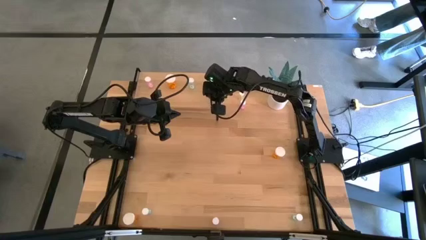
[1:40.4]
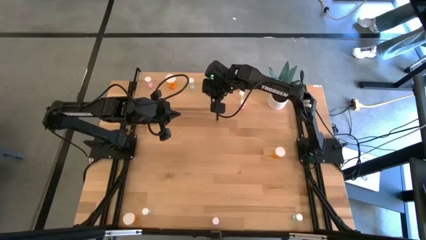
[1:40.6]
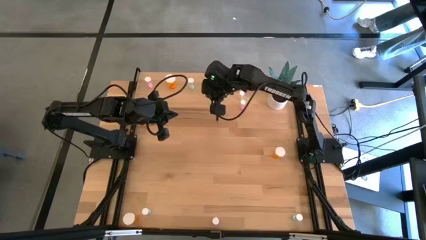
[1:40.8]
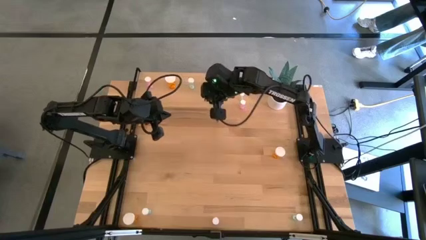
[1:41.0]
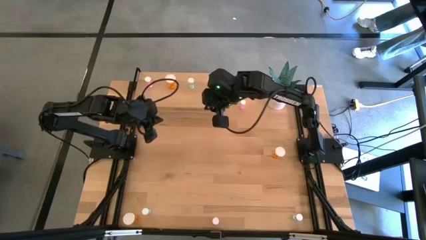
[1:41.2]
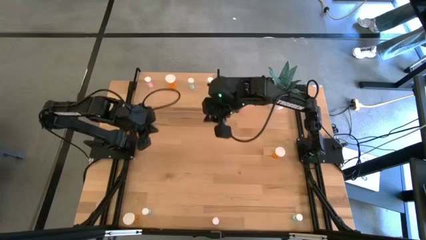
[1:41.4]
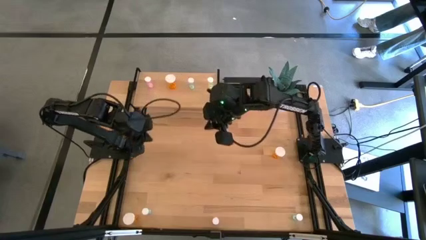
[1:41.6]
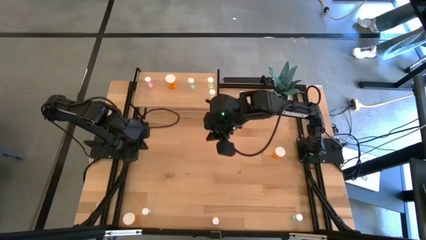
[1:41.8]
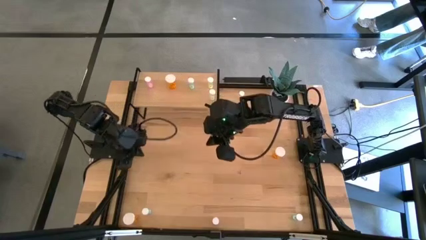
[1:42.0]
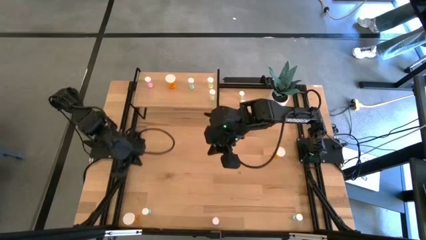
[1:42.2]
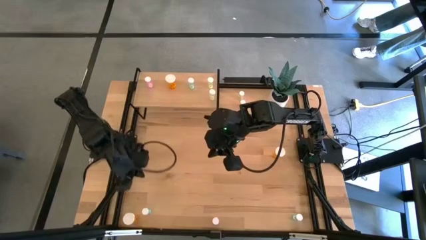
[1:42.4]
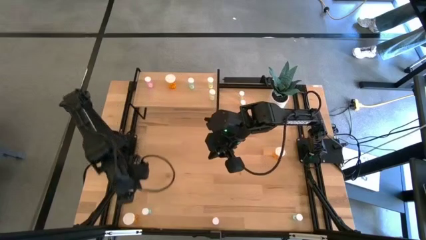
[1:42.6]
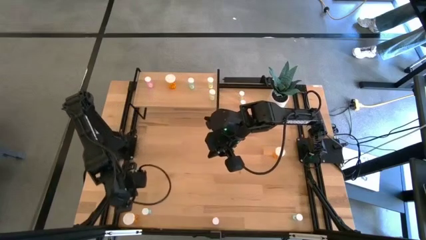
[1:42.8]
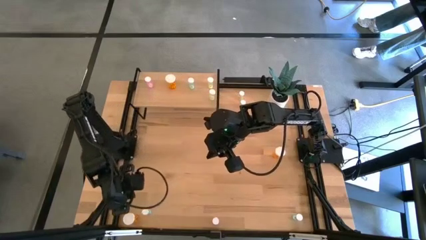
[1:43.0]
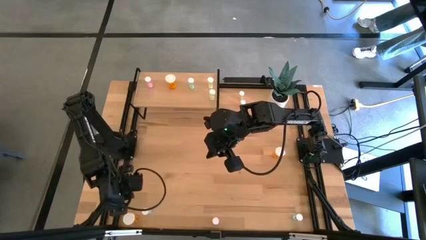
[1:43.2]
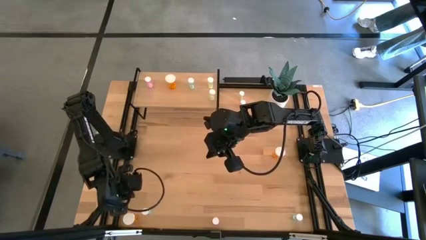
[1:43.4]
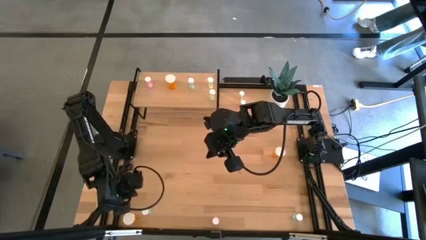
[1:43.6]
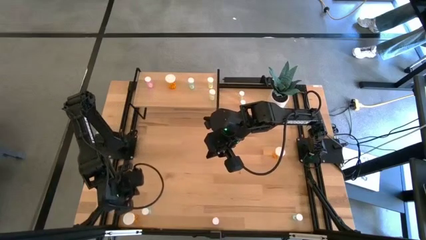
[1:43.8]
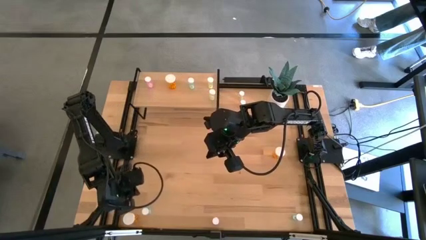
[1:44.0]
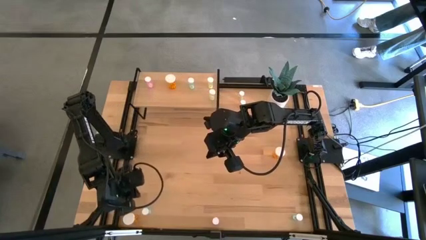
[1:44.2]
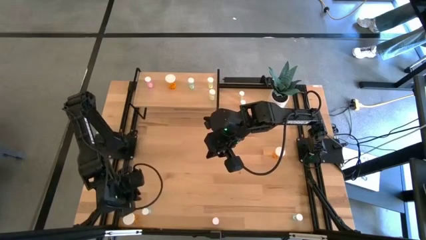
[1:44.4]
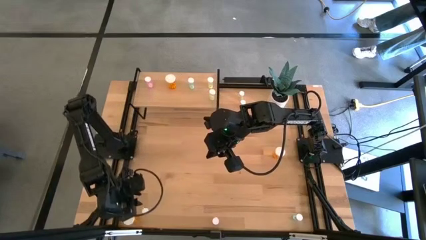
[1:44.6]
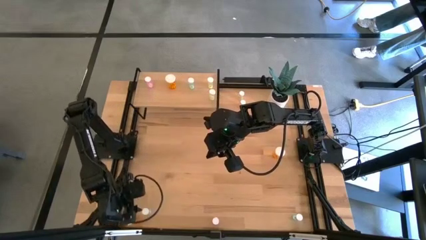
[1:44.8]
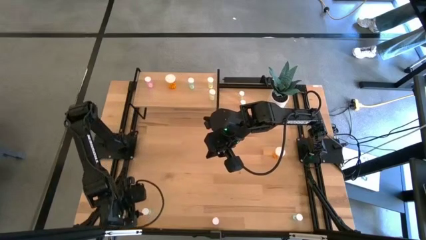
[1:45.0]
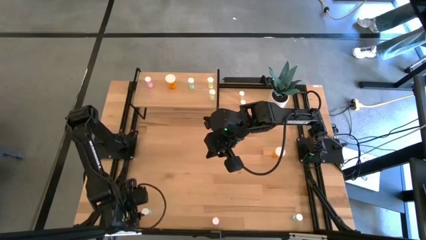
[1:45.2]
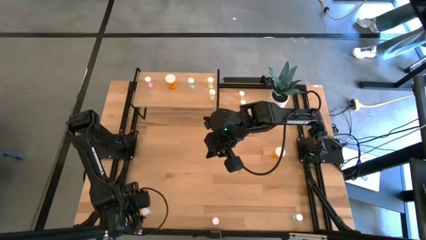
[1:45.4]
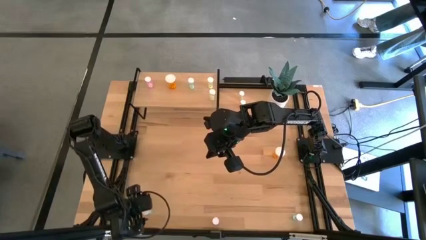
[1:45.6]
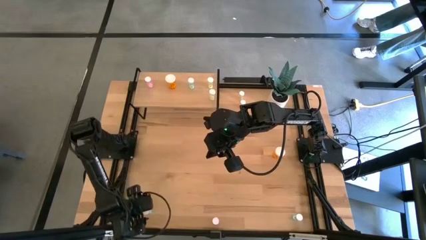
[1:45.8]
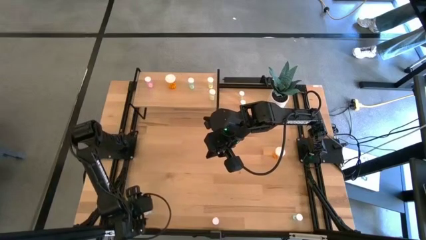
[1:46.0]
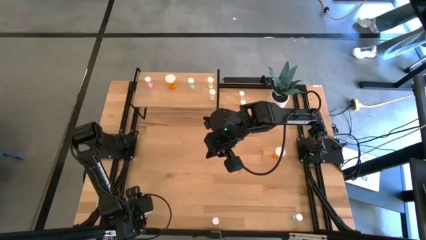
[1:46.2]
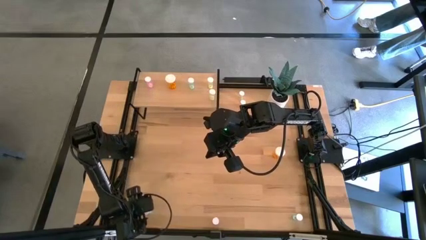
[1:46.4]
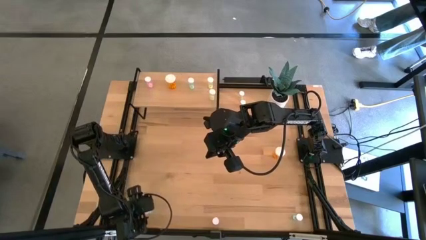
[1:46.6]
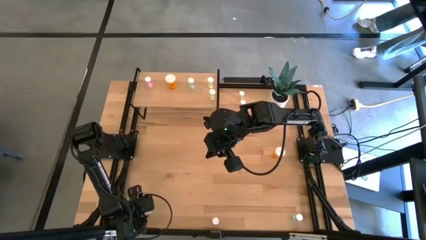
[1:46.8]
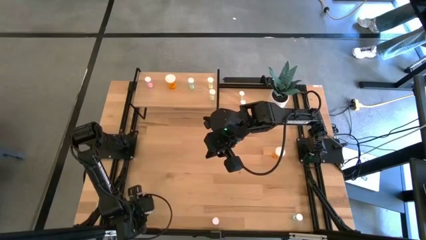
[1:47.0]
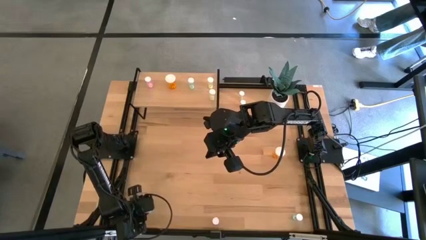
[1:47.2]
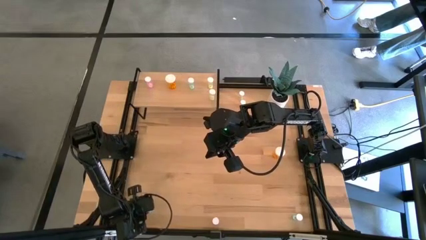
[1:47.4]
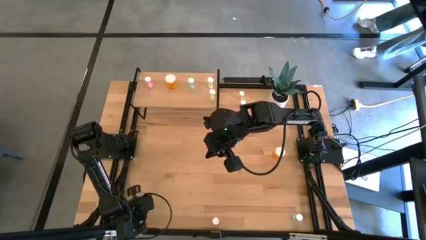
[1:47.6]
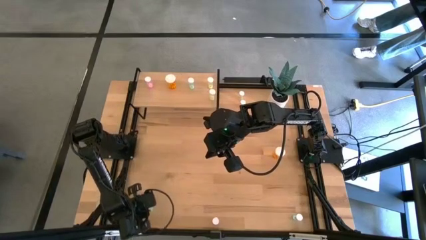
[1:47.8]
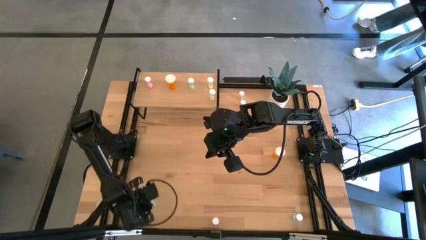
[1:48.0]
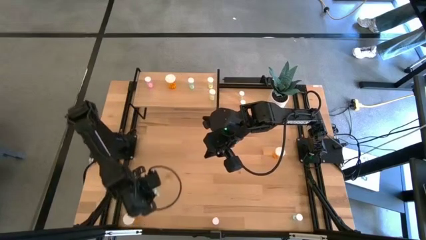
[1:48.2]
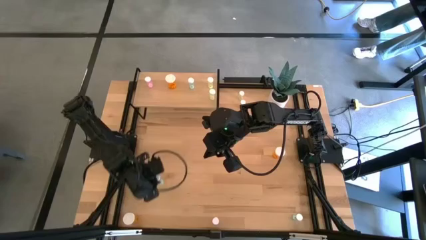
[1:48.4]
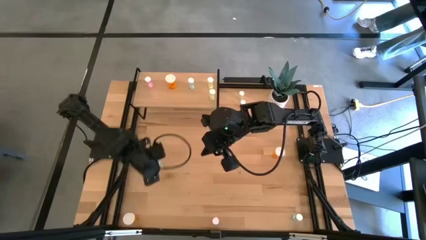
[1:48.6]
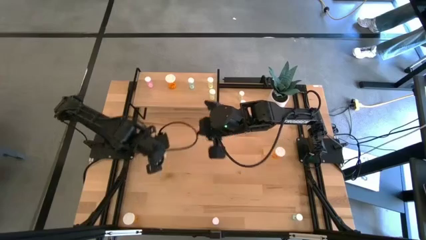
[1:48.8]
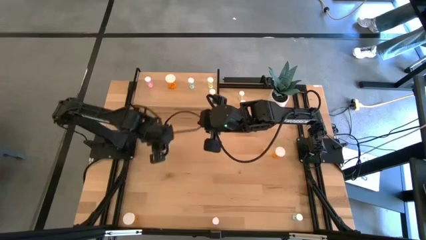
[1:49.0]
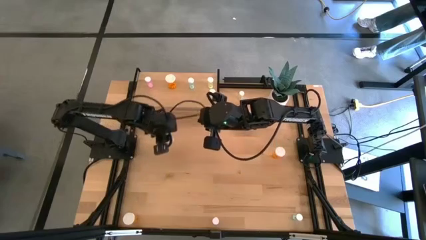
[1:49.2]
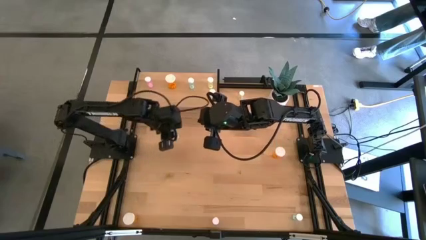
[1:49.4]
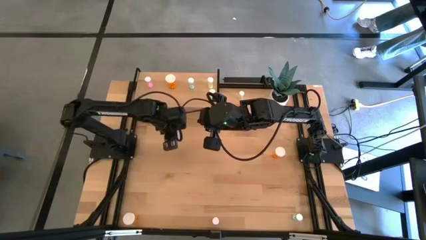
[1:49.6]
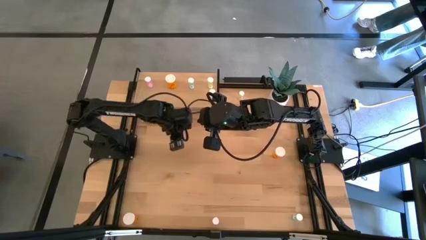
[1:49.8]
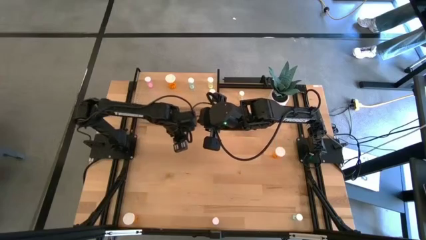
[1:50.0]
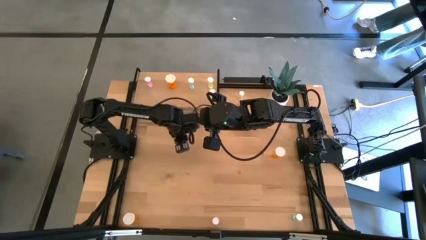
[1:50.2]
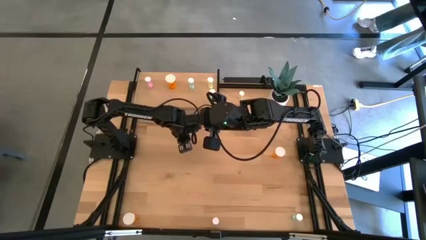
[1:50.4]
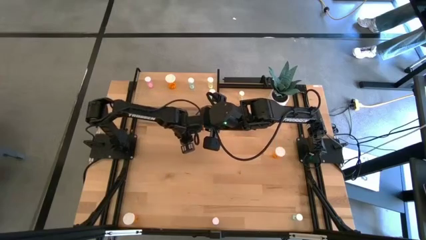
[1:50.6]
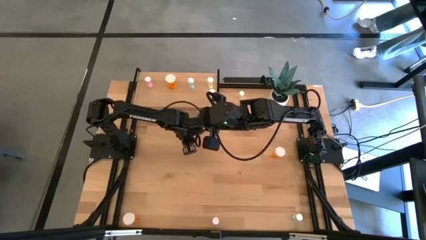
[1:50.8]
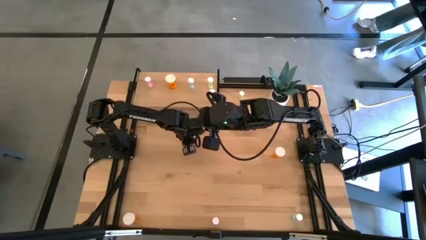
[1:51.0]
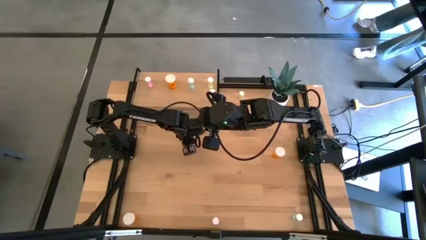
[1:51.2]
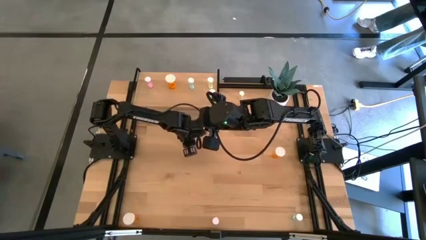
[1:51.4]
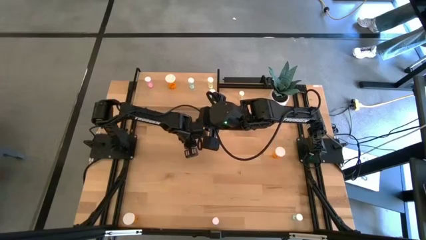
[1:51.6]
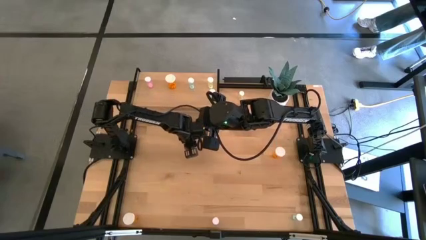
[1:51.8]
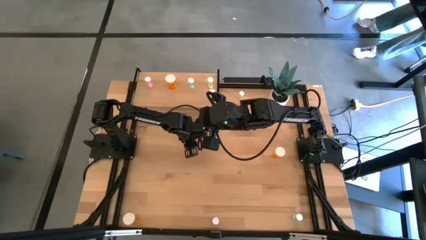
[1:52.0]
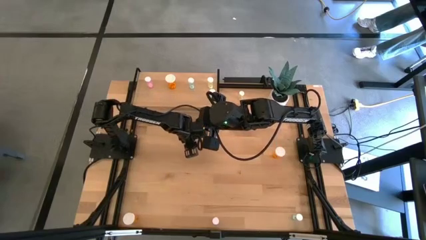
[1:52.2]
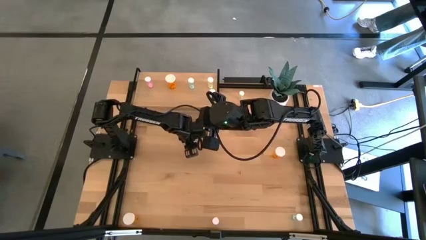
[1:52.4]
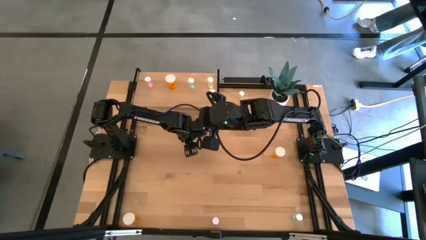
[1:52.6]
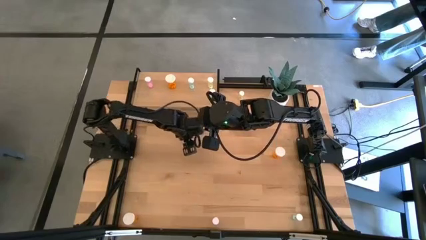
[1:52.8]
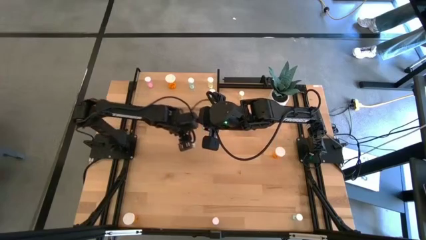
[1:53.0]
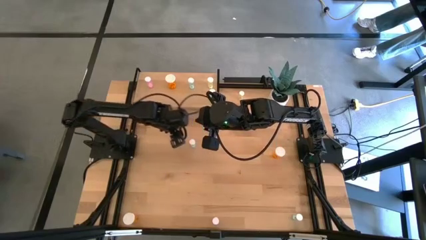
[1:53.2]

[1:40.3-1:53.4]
Task: Pick and place medicine bottles onto shelf by color
Put the left blue pill bottle on the shelf aligned with the other blue pill bottle
